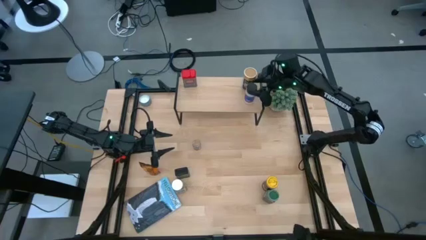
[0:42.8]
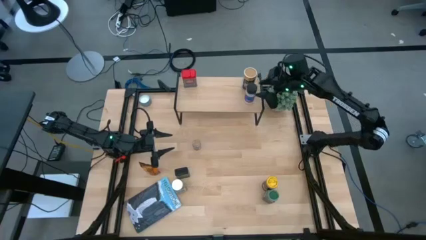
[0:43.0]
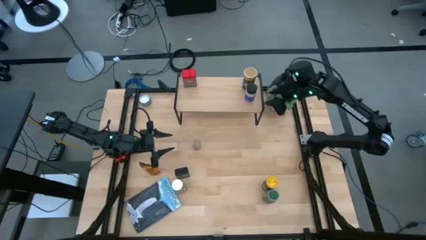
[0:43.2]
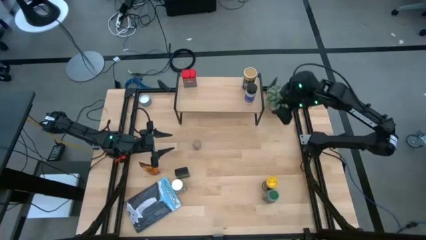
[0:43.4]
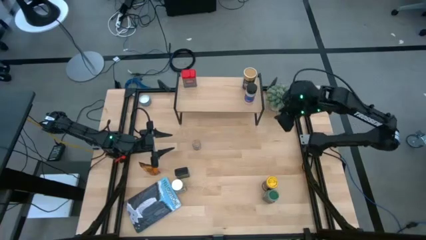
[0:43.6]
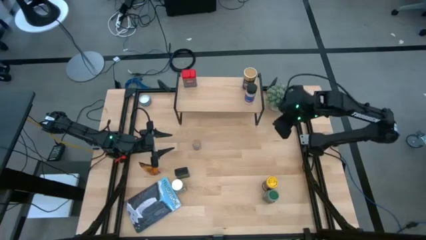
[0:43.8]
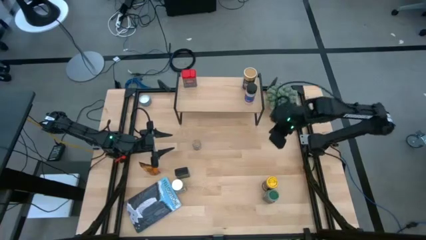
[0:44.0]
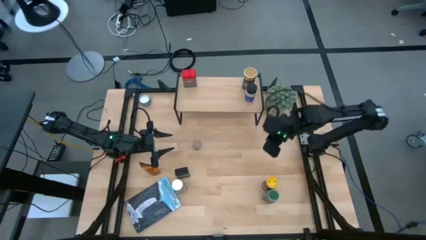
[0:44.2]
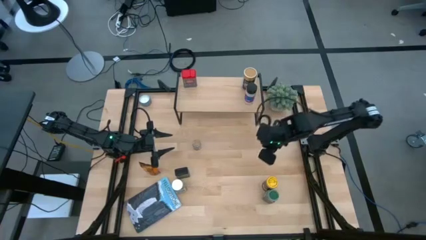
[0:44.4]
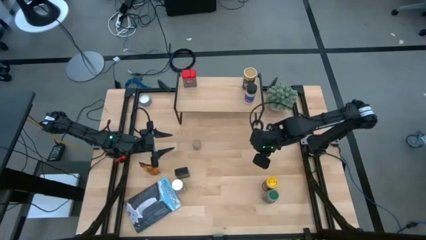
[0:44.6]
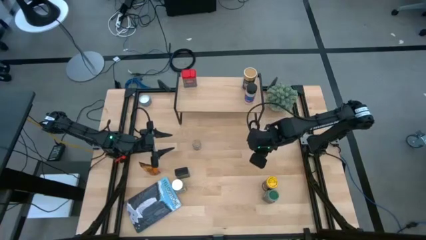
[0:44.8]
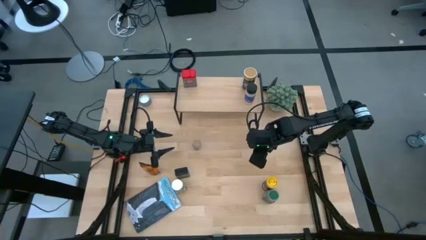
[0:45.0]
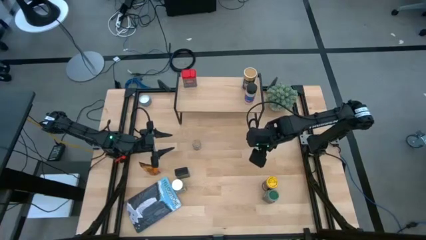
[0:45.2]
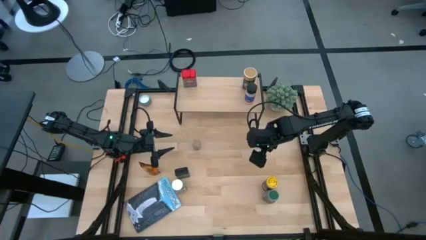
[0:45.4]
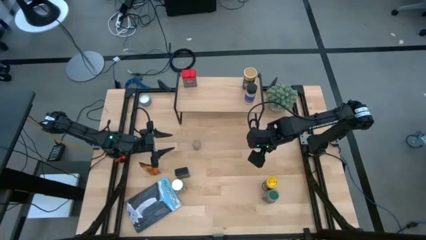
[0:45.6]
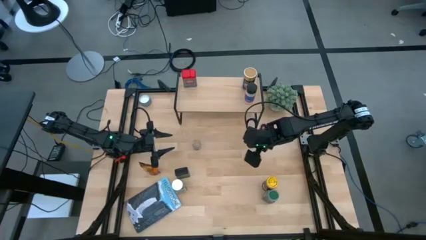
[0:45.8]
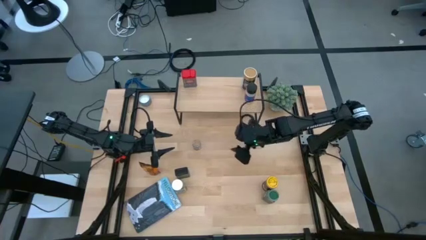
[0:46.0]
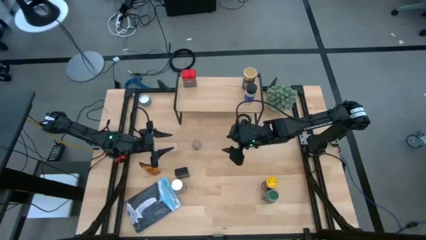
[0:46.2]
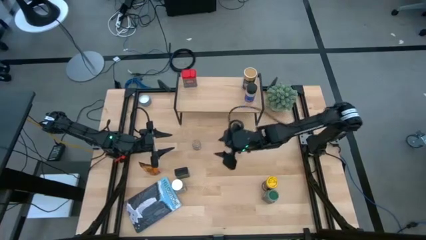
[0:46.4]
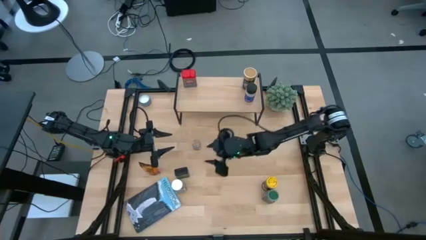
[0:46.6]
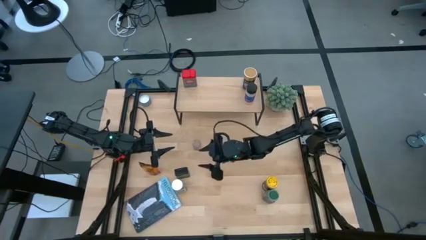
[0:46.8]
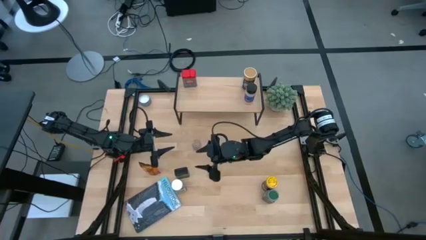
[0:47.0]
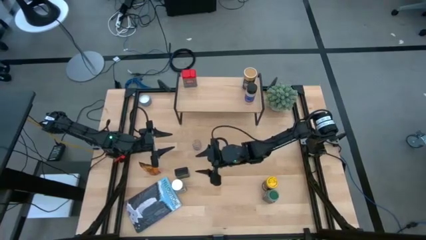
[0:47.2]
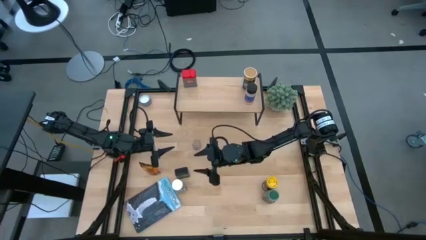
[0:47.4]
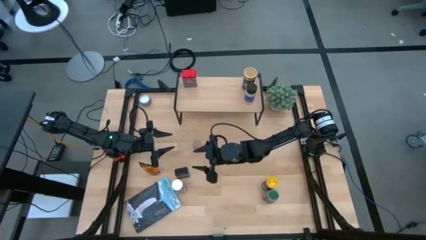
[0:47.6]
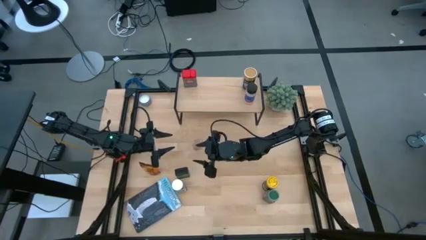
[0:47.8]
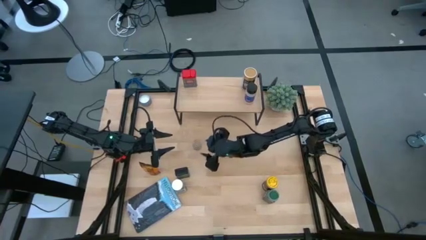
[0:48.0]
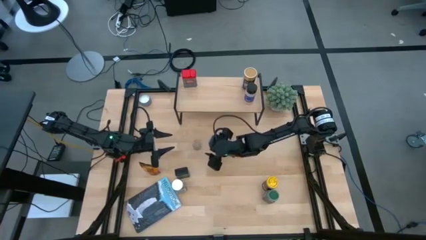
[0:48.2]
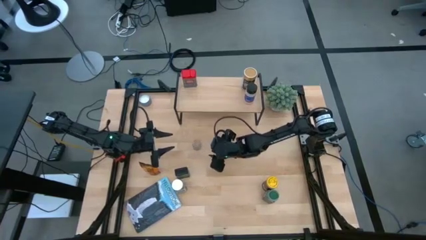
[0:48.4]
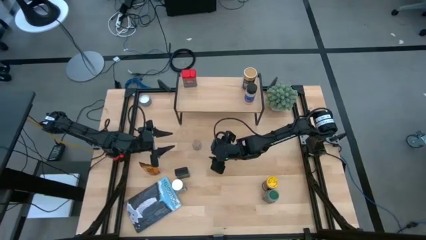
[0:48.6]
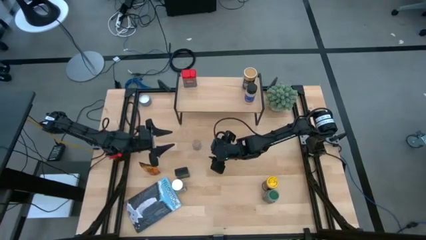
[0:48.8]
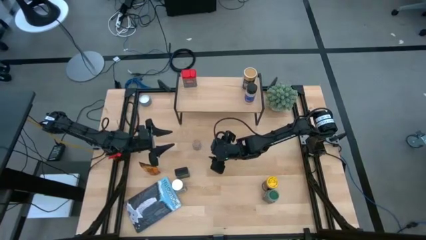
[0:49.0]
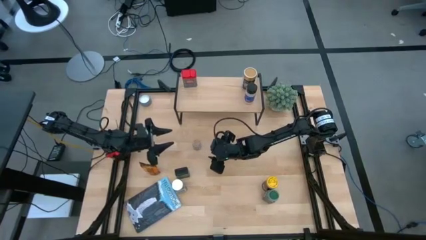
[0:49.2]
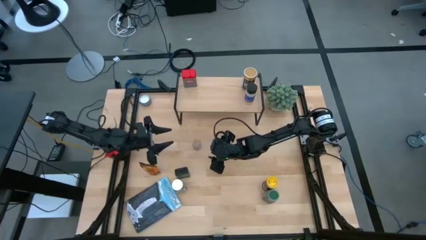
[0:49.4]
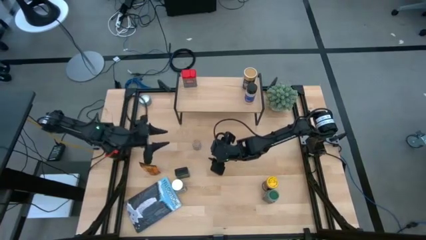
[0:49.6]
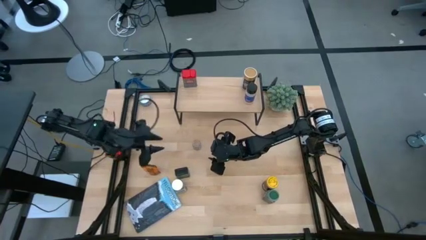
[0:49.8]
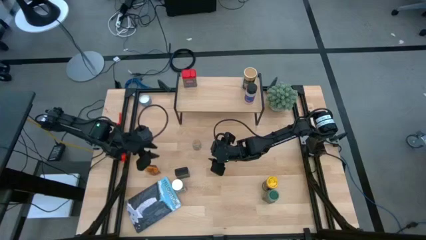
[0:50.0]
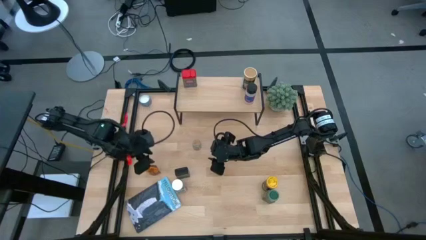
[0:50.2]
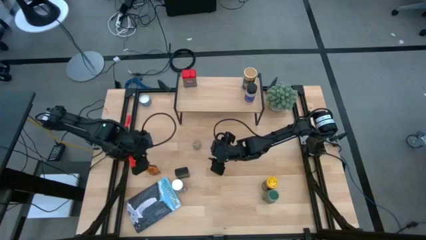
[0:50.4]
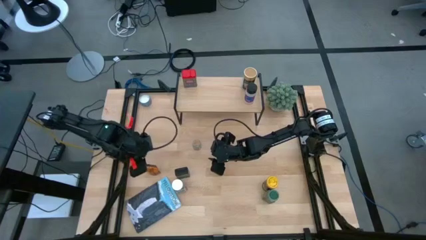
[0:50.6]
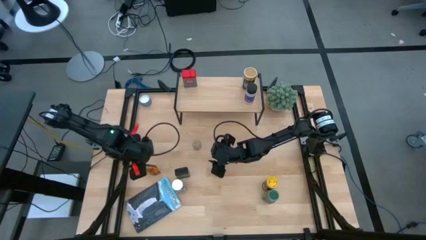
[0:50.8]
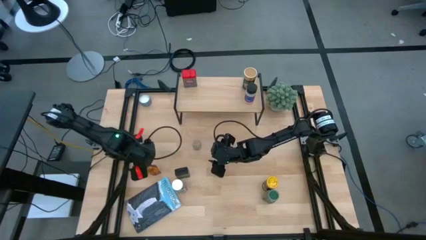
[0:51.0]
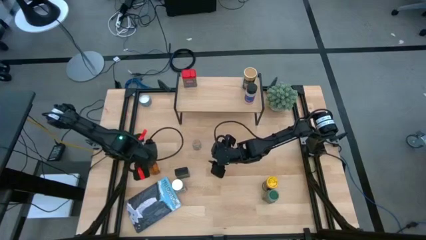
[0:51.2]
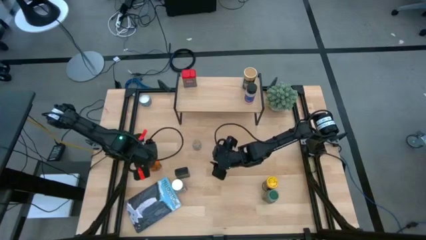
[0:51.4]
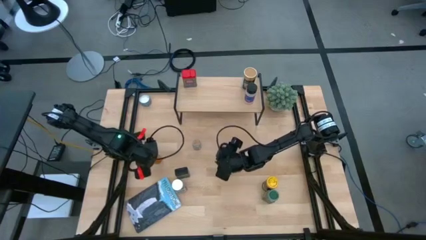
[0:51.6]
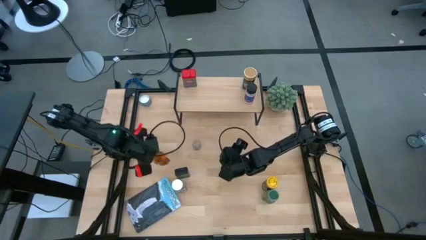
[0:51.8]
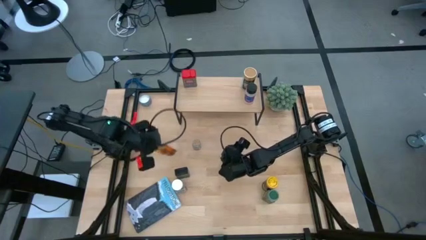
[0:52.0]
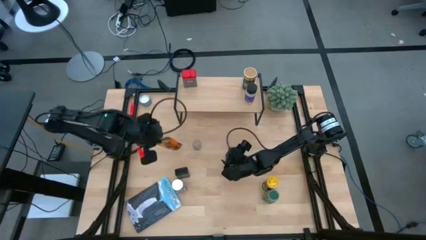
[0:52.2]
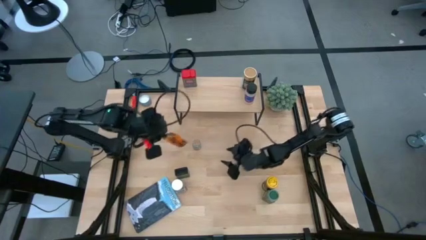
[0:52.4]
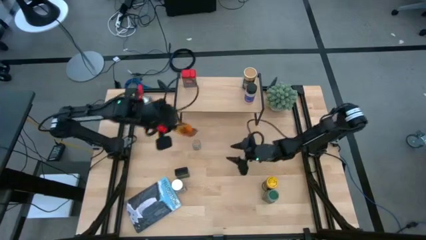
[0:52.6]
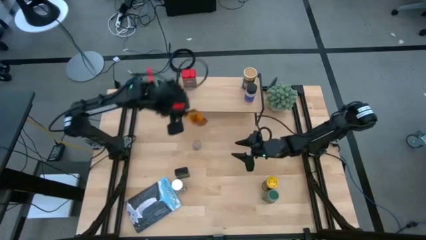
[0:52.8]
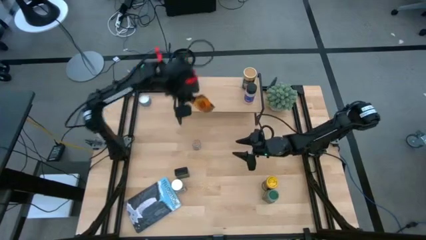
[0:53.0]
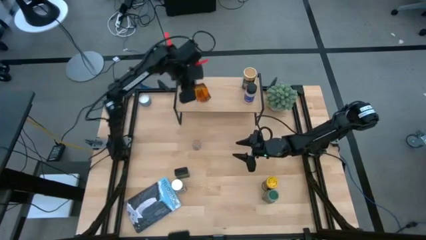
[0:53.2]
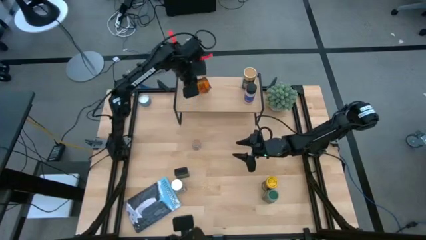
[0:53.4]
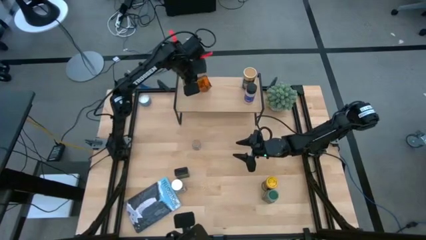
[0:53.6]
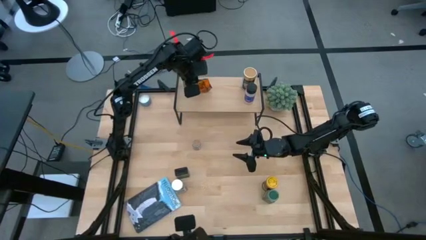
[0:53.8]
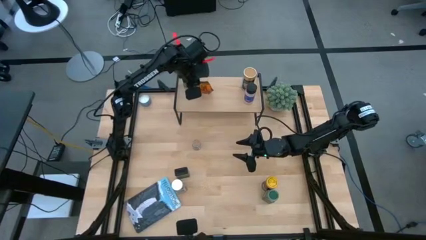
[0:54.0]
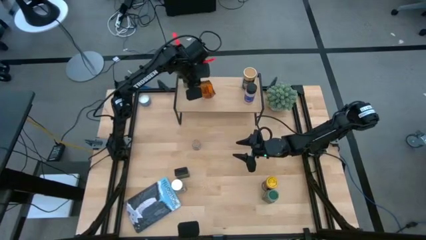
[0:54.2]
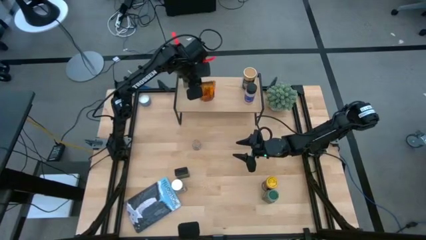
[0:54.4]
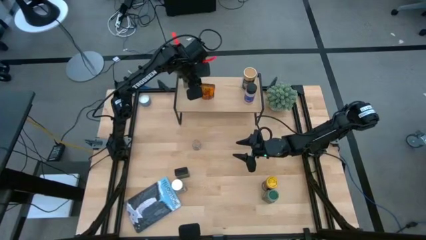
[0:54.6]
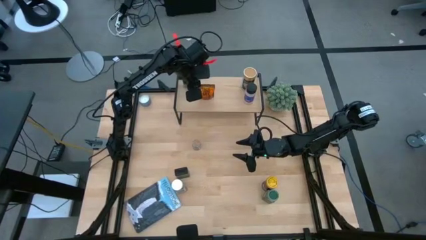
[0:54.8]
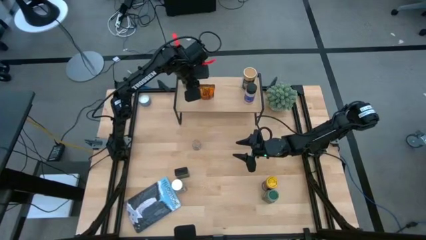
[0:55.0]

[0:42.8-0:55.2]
Task: Shelf spices
Put the orange seasoning bag on the shelf
